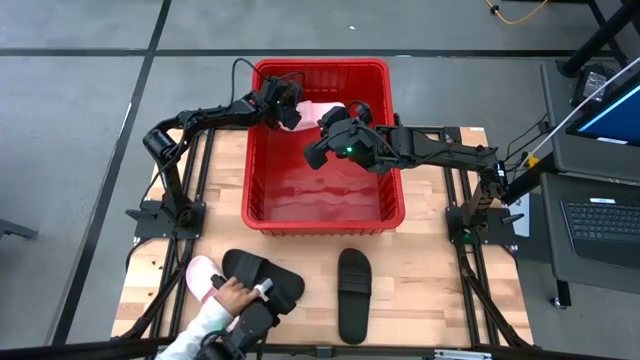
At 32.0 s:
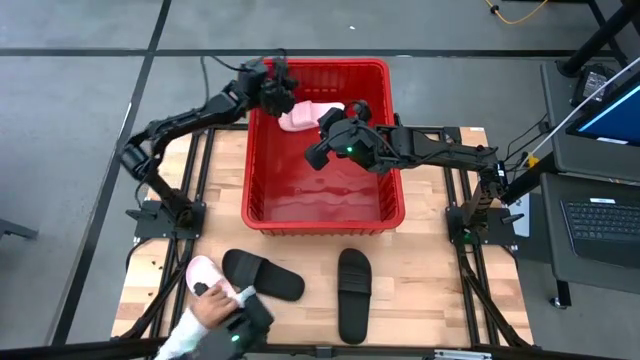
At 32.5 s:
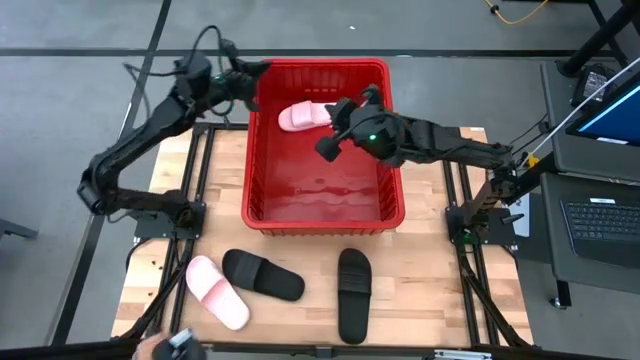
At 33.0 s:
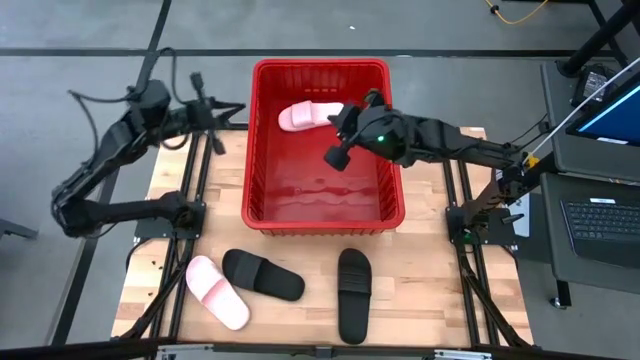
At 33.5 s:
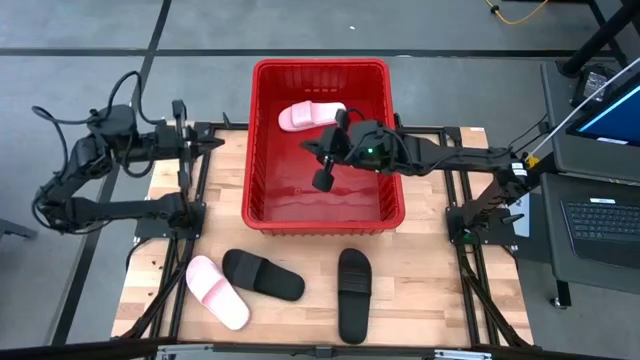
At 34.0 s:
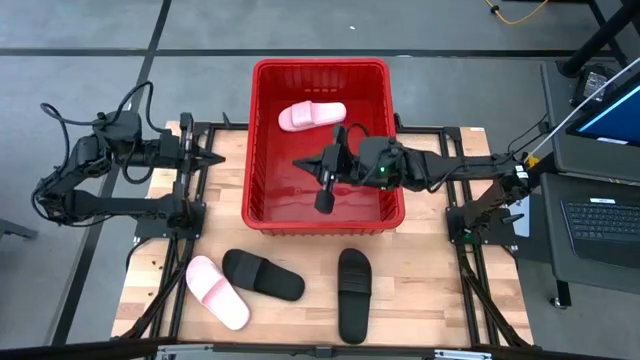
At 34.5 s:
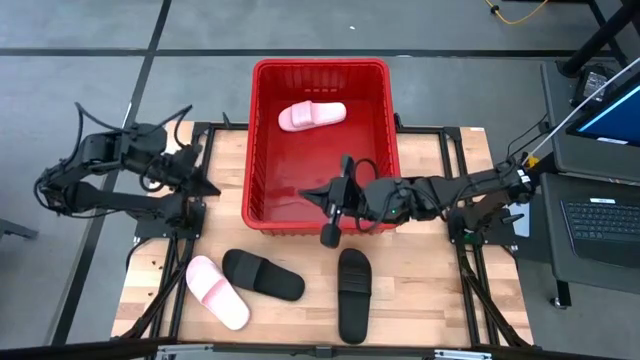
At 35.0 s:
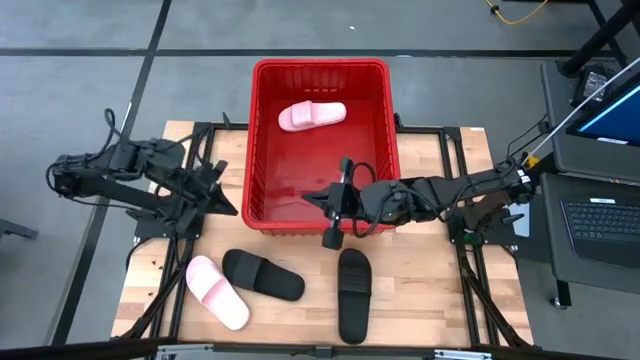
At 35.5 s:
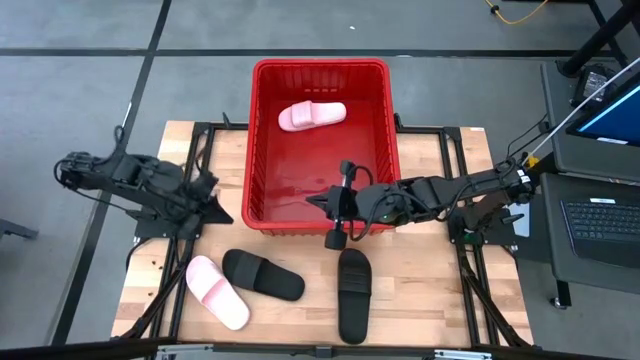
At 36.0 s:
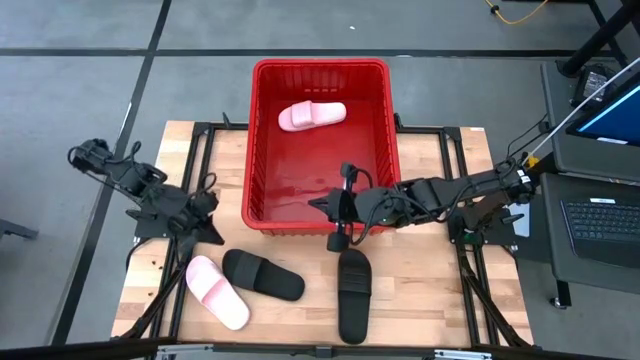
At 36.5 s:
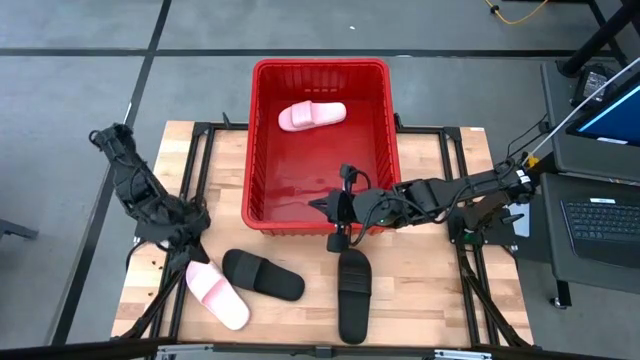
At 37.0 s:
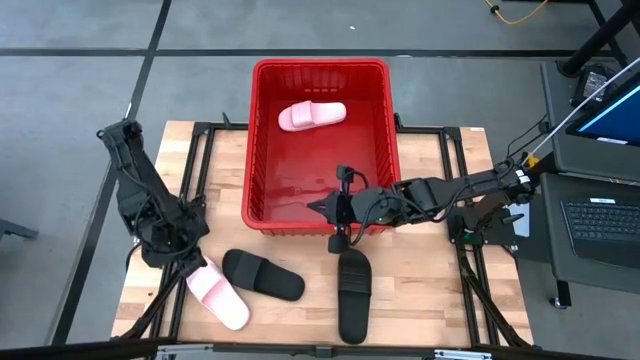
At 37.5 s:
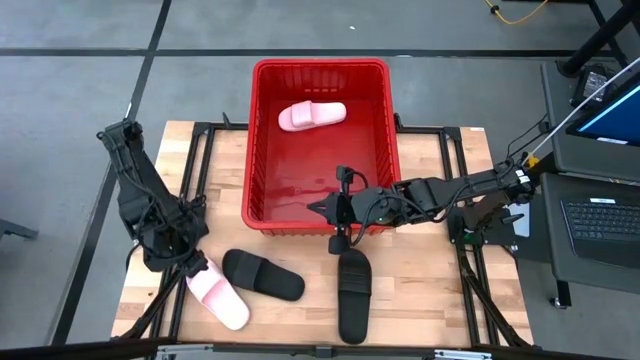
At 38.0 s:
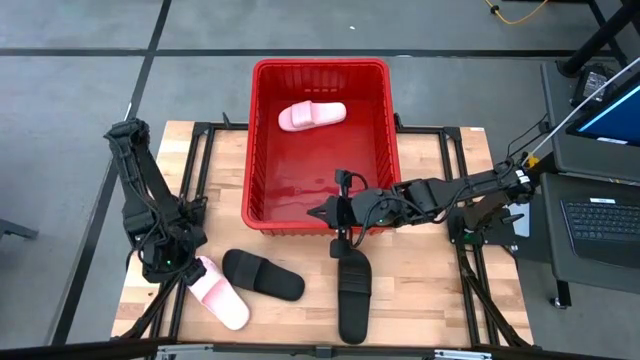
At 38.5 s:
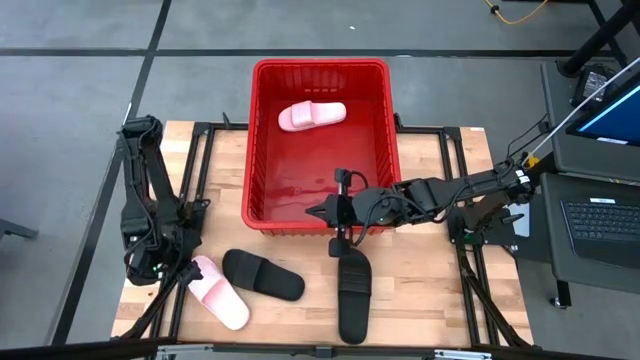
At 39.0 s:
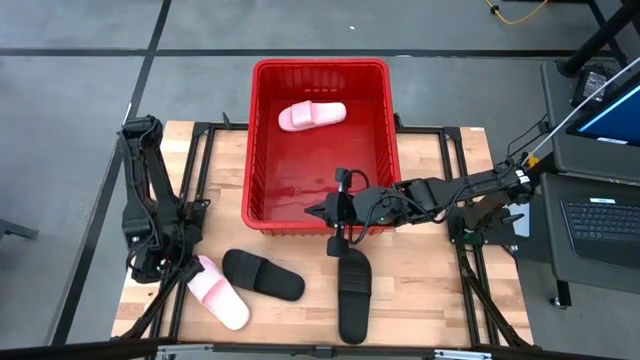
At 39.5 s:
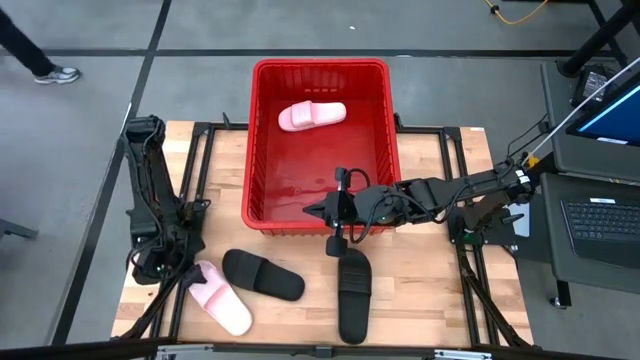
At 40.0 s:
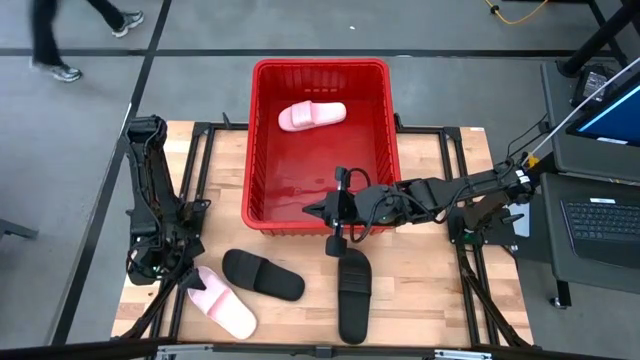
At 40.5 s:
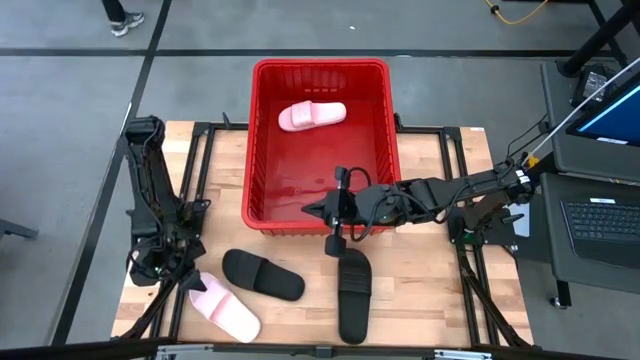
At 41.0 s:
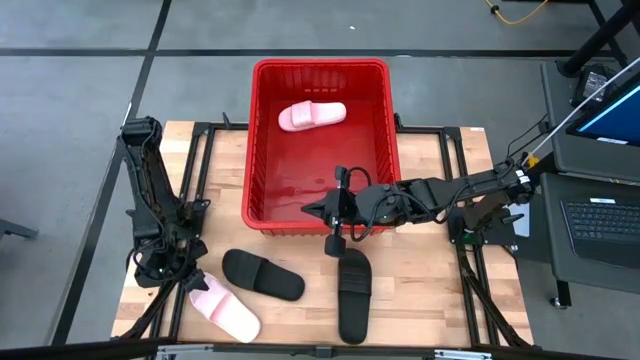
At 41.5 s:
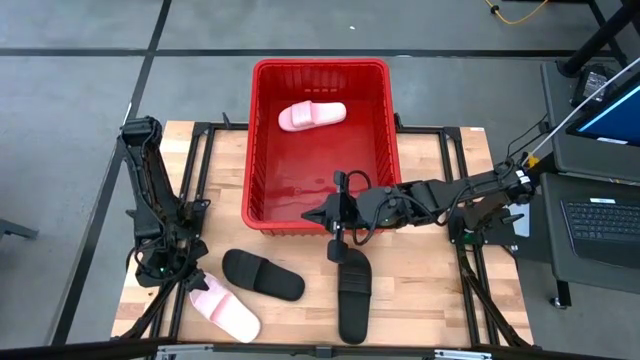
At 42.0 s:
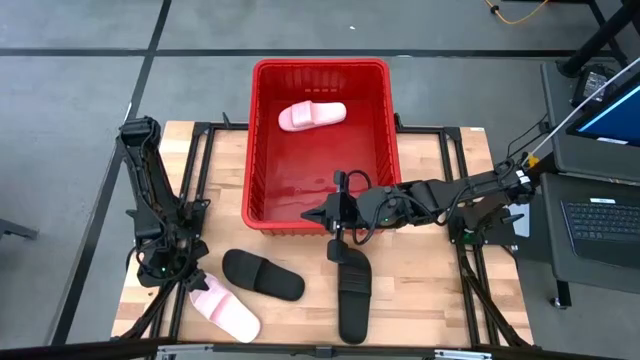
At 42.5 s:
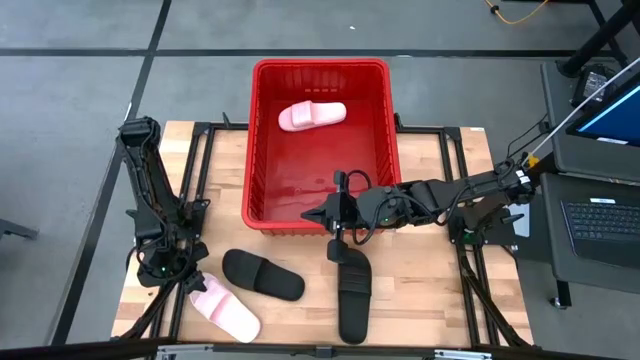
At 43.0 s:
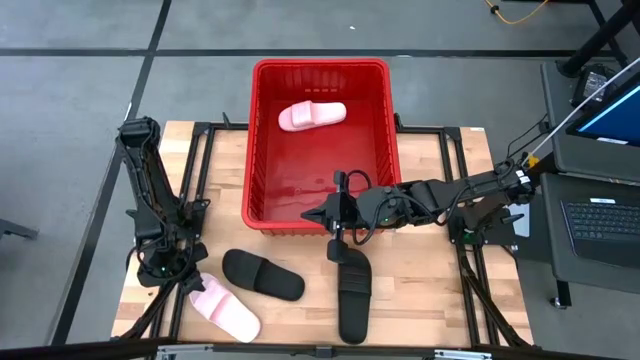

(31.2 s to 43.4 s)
Task: Pick and place slides into bin
Put the pink slide into the bin

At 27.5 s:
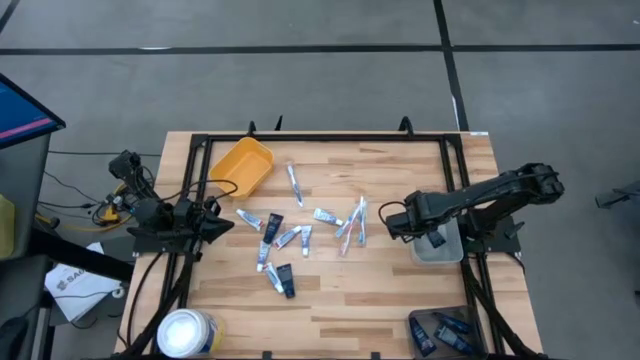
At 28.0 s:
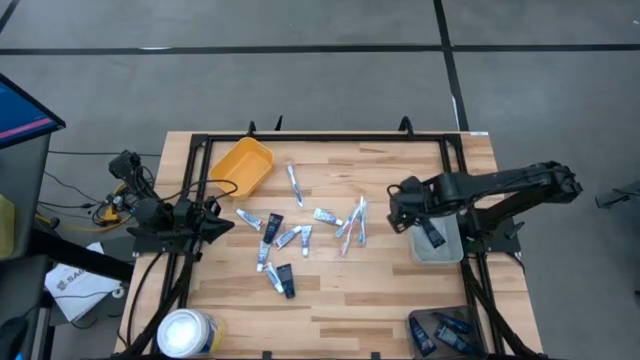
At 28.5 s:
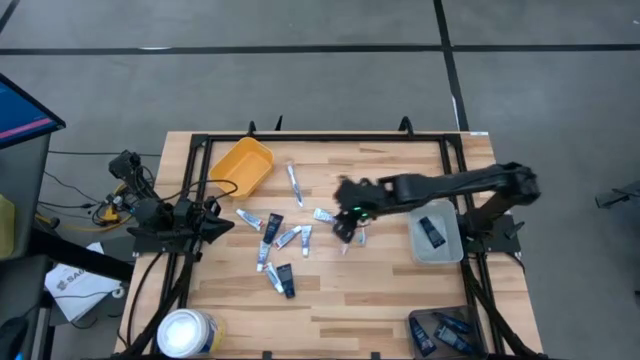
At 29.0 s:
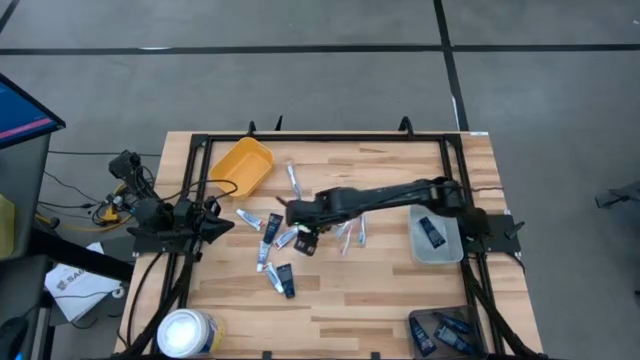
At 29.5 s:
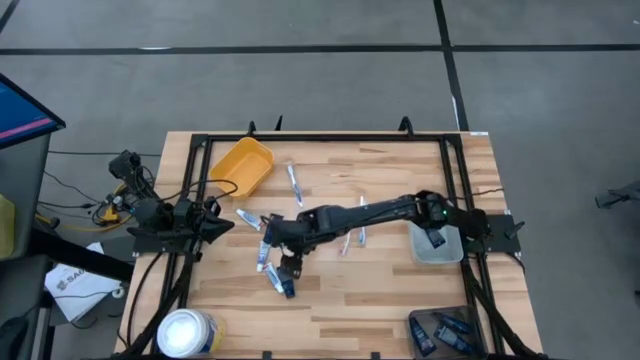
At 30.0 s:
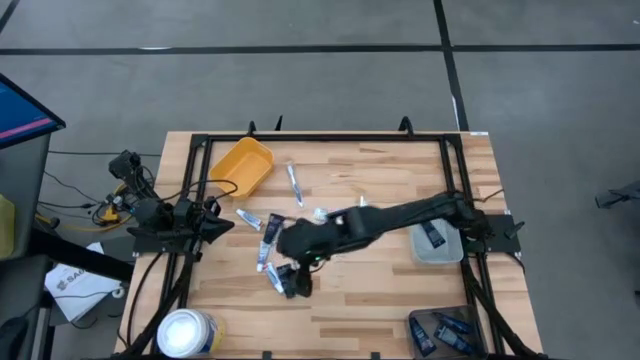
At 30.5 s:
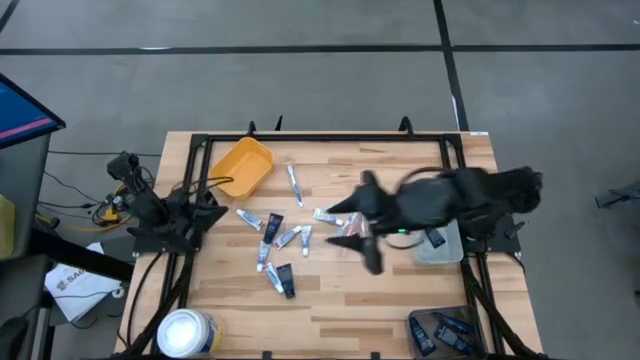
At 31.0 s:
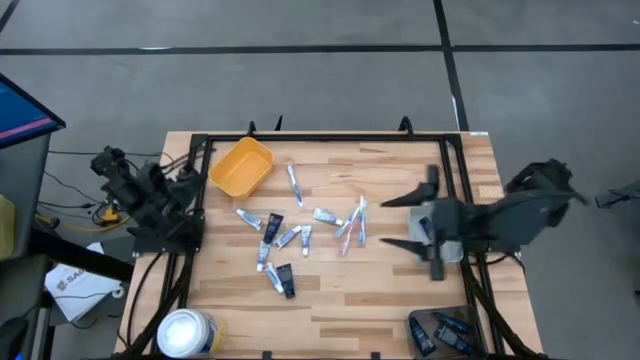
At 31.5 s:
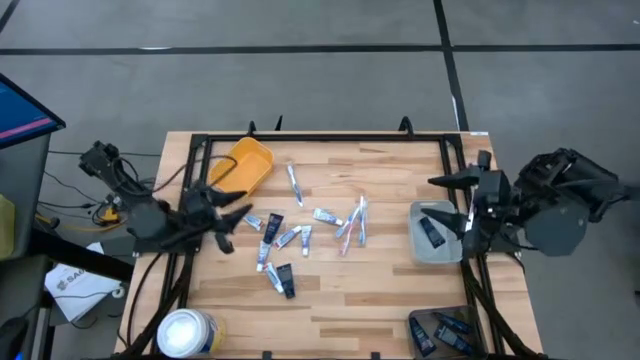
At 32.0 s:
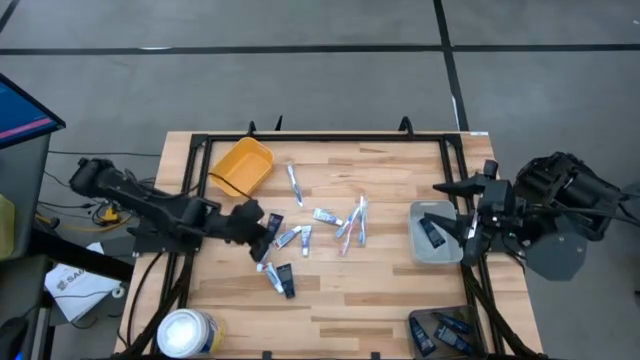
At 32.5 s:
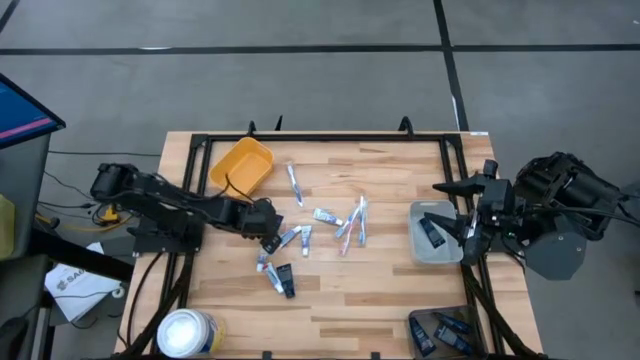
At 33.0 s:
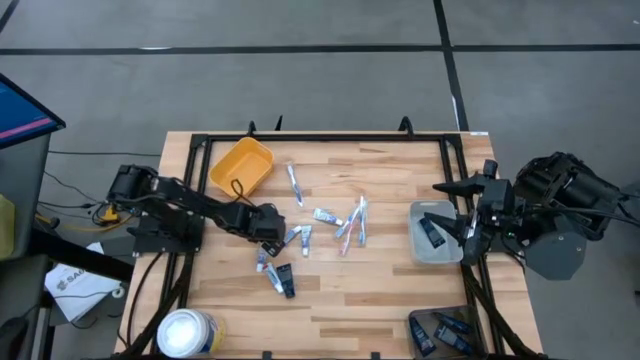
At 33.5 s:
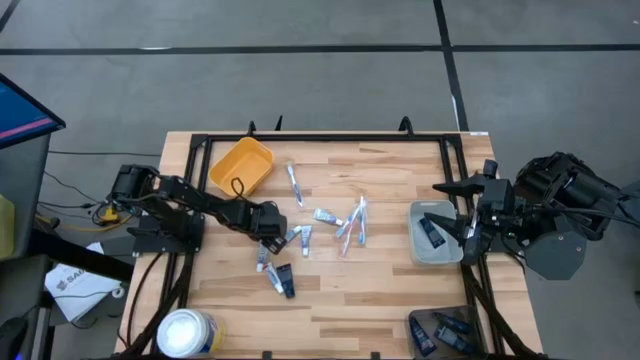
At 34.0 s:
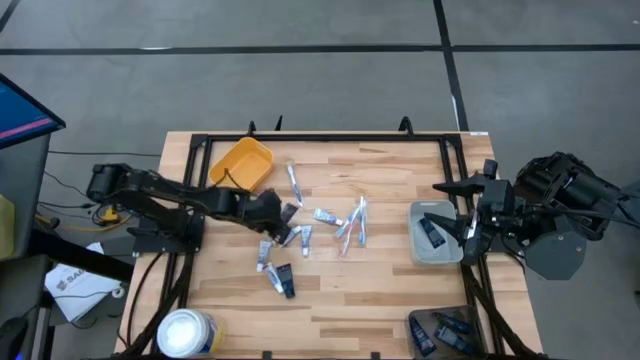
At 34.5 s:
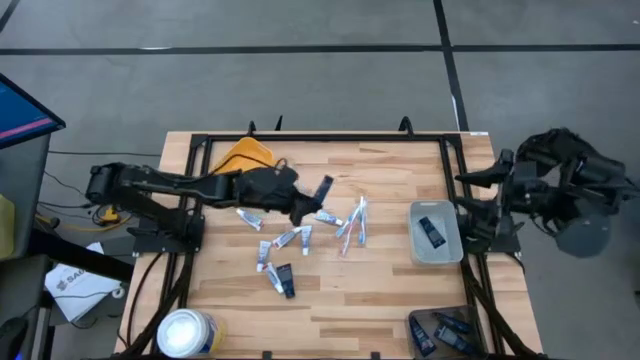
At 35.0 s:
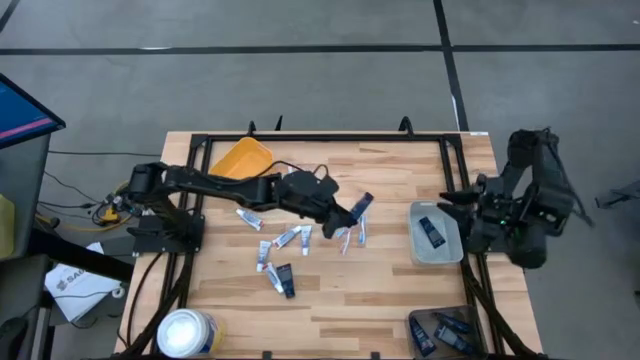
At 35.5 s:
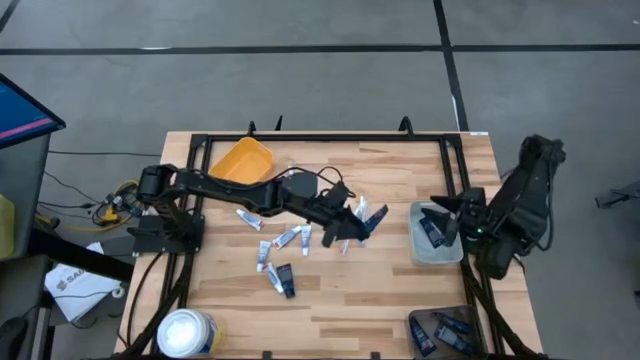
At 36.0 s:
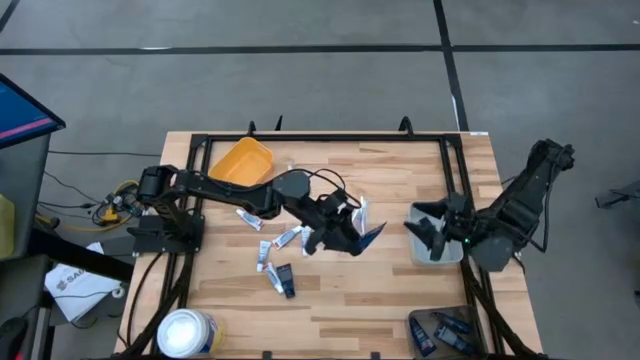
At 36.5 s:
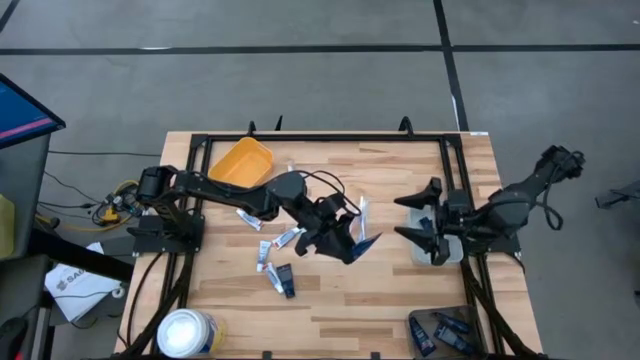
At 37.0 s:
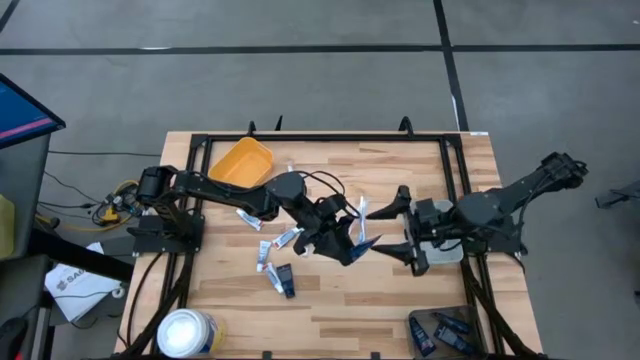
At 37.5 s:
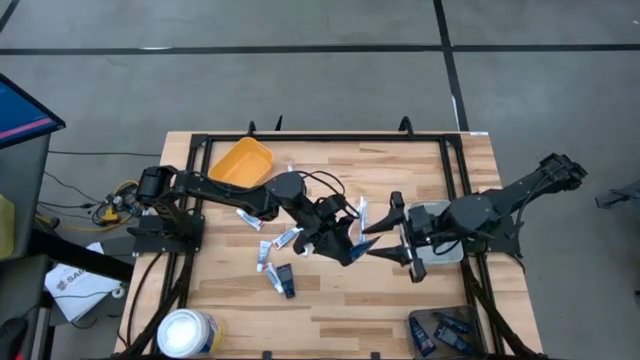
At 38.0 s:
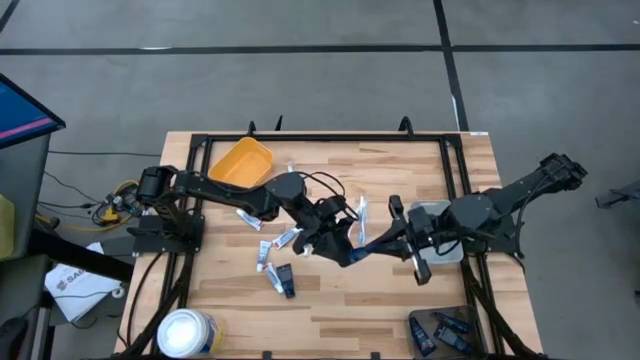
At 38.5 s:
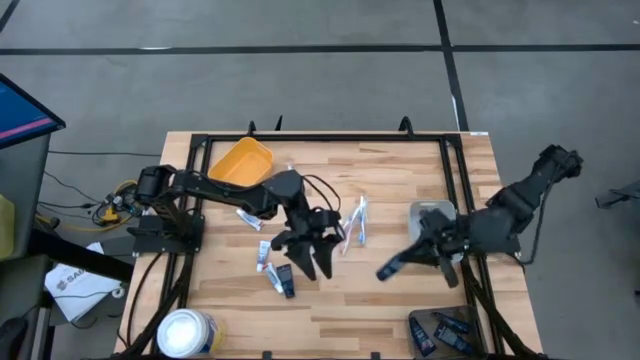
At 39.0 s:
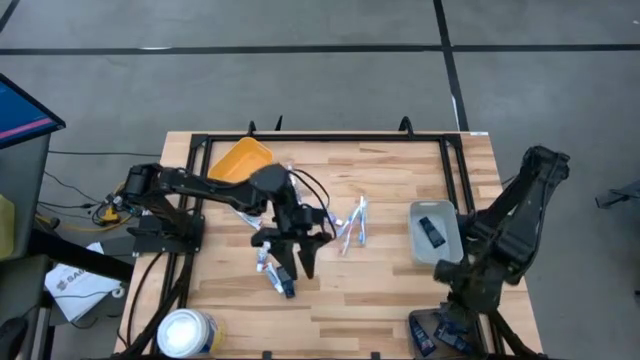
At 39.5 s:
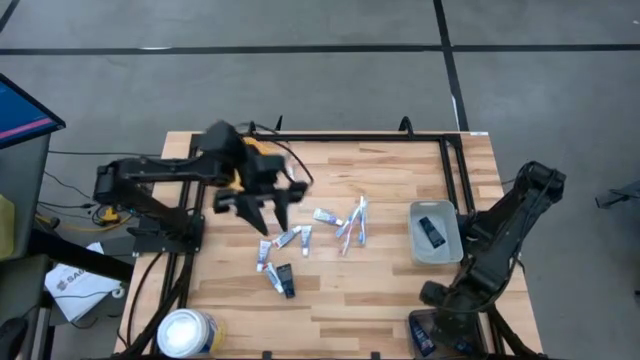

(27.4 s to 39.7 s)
Task: Pick & Place Travel size toiletries
Put the blue shave cream into the black bin
